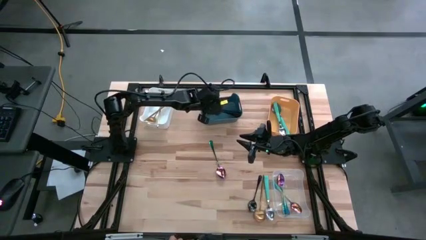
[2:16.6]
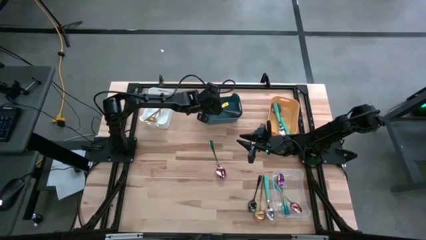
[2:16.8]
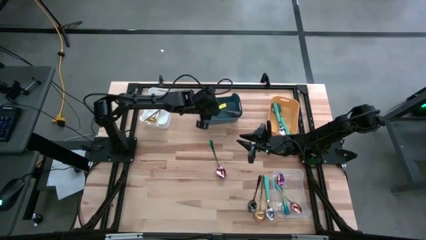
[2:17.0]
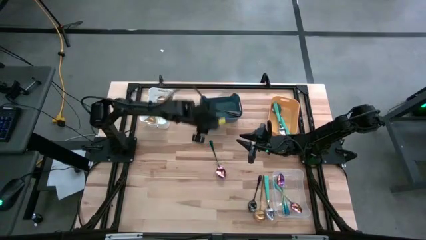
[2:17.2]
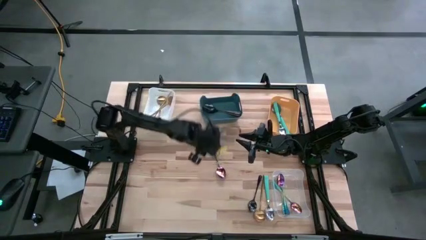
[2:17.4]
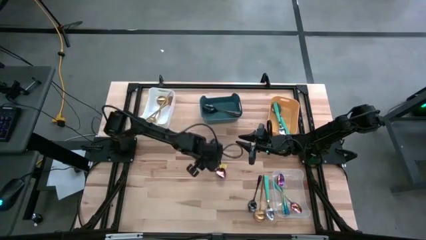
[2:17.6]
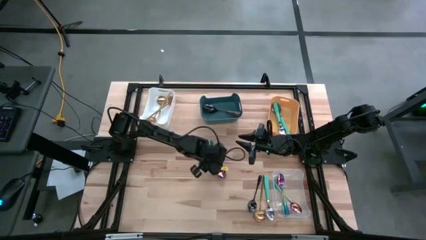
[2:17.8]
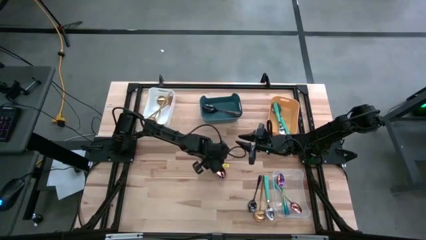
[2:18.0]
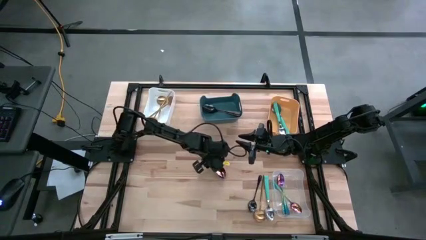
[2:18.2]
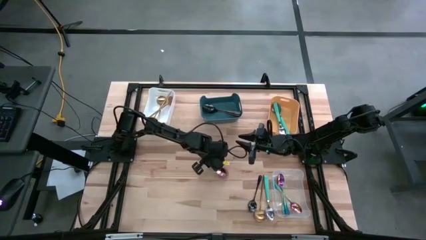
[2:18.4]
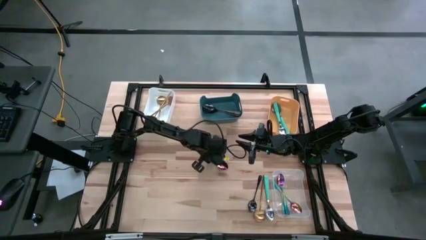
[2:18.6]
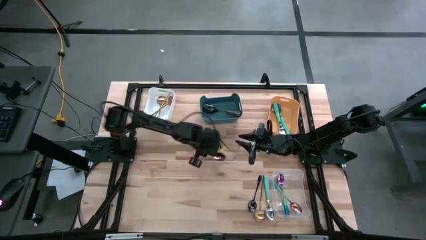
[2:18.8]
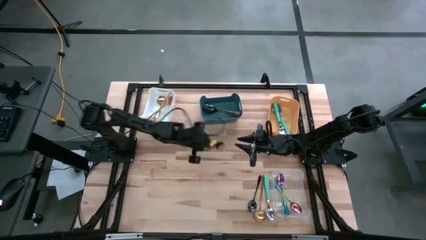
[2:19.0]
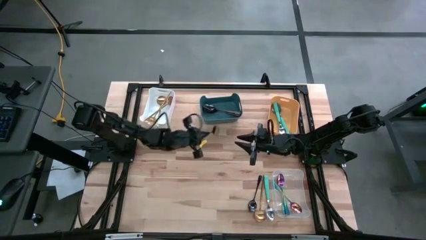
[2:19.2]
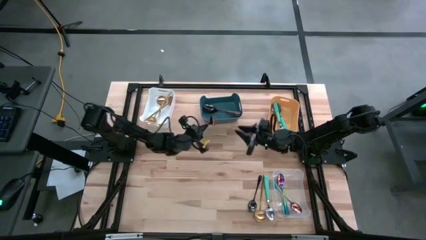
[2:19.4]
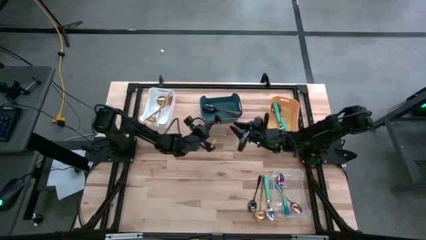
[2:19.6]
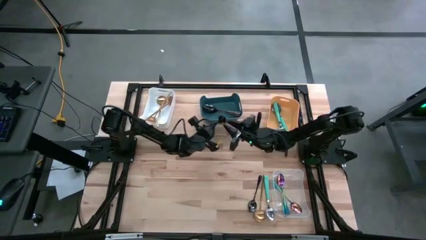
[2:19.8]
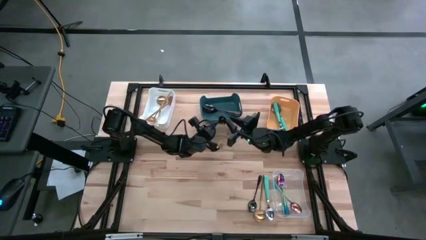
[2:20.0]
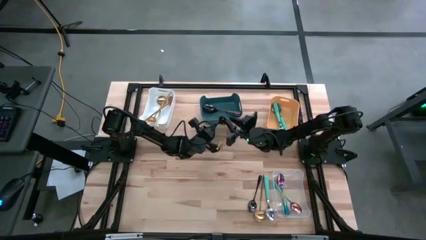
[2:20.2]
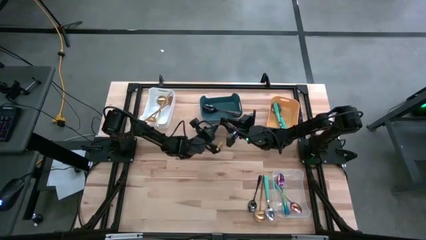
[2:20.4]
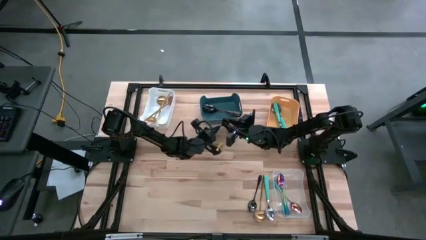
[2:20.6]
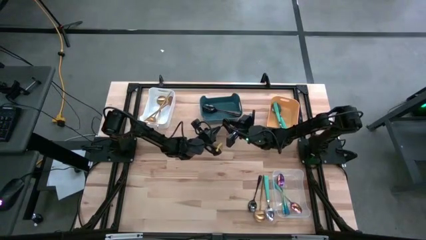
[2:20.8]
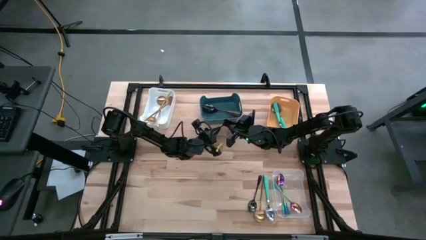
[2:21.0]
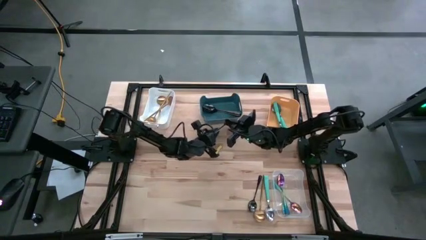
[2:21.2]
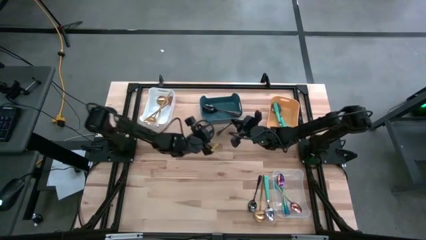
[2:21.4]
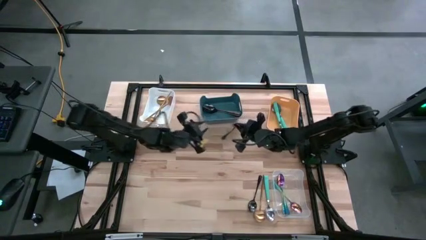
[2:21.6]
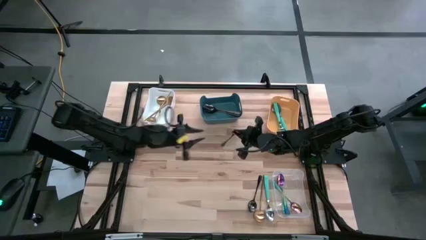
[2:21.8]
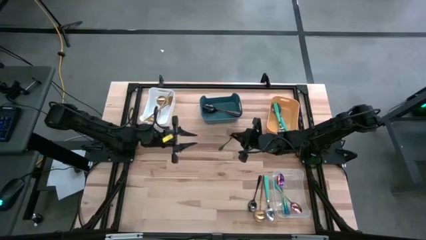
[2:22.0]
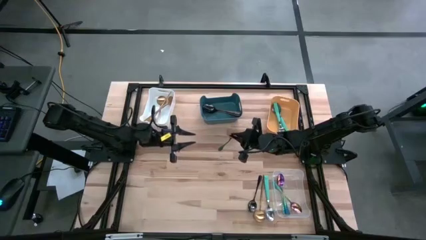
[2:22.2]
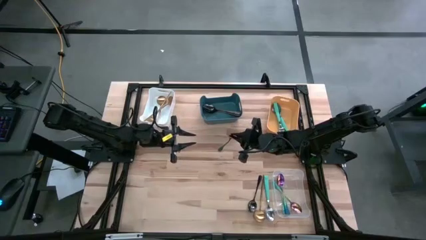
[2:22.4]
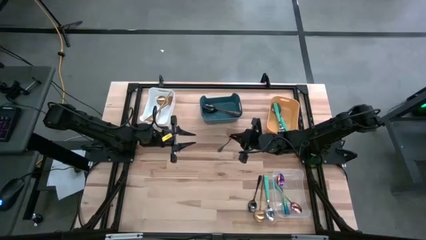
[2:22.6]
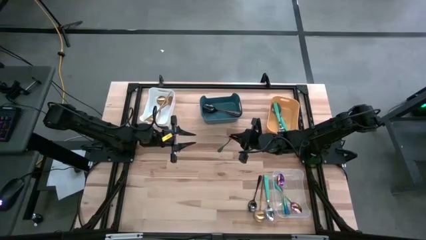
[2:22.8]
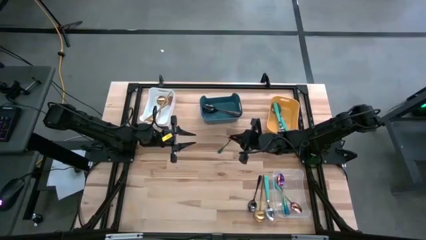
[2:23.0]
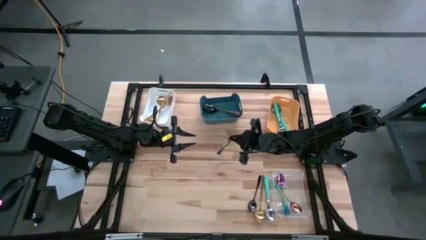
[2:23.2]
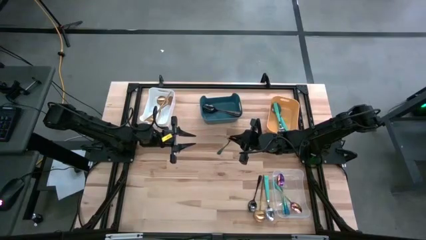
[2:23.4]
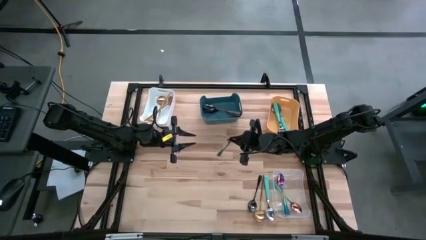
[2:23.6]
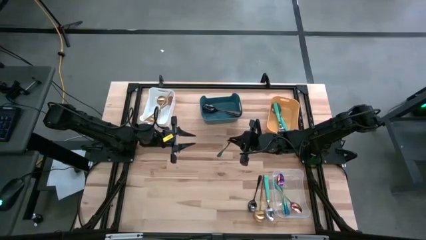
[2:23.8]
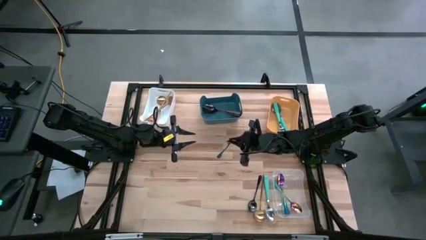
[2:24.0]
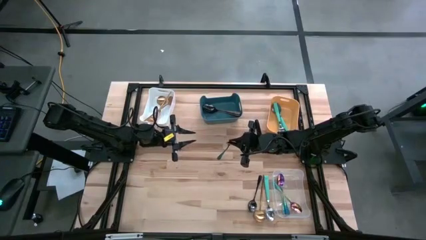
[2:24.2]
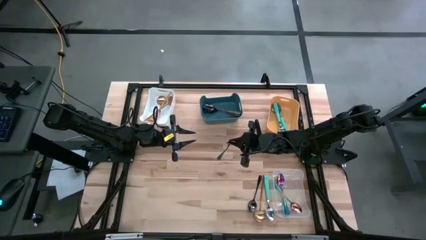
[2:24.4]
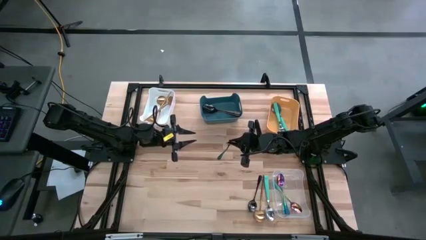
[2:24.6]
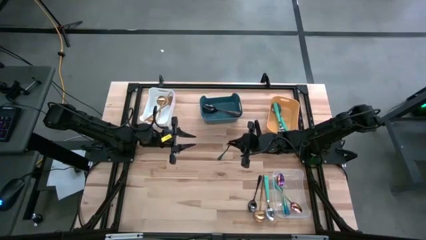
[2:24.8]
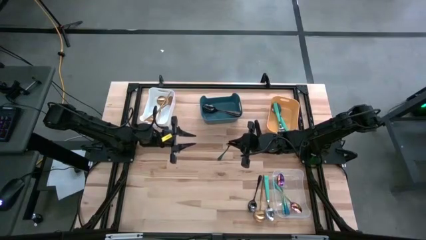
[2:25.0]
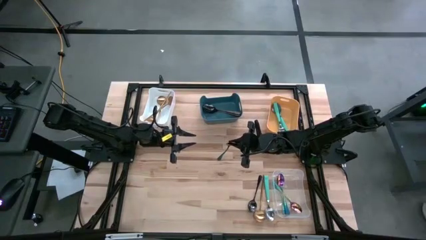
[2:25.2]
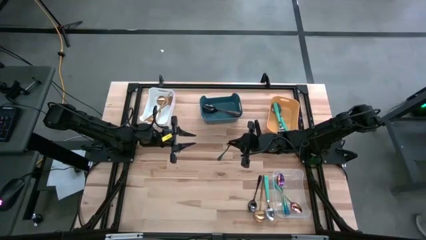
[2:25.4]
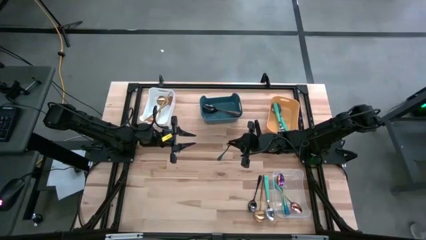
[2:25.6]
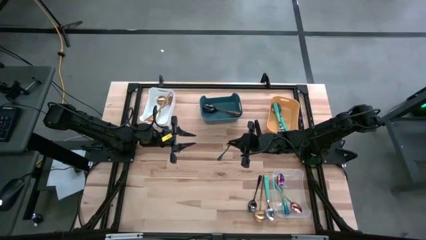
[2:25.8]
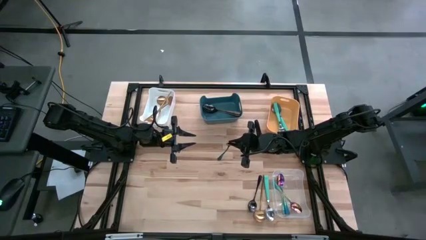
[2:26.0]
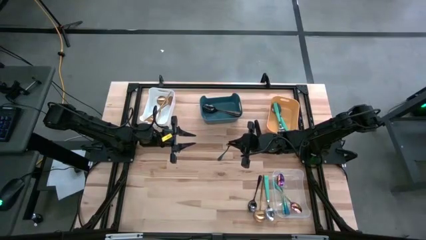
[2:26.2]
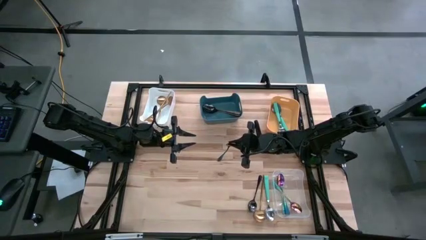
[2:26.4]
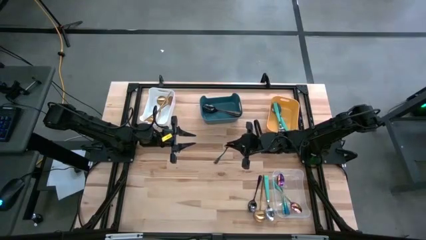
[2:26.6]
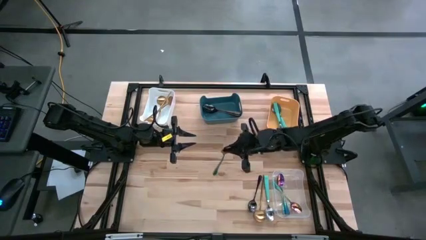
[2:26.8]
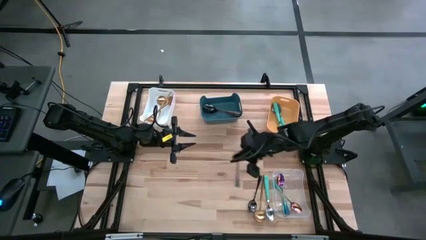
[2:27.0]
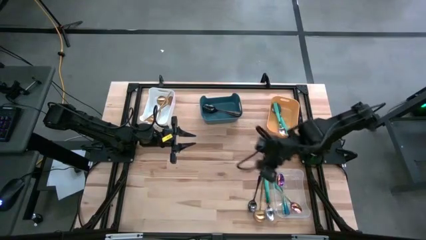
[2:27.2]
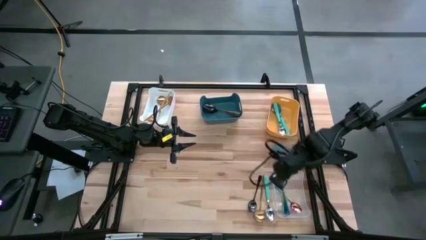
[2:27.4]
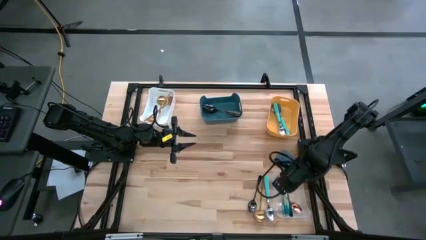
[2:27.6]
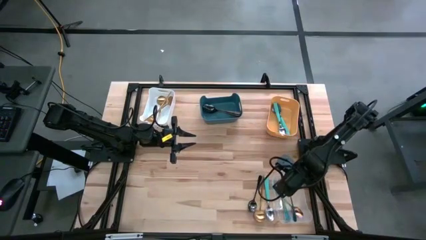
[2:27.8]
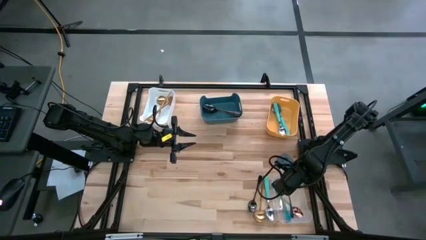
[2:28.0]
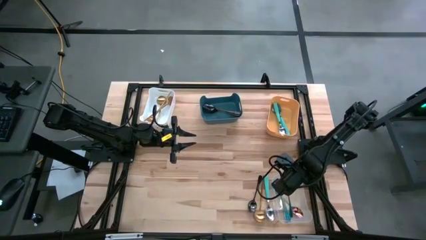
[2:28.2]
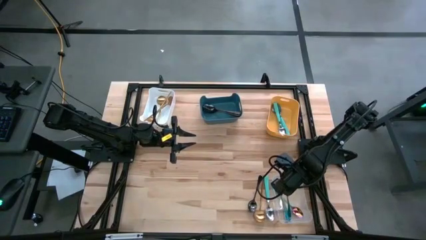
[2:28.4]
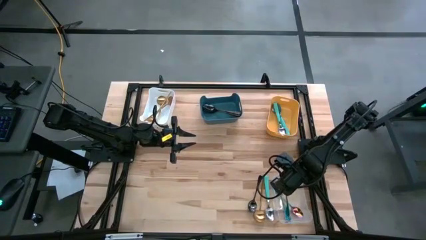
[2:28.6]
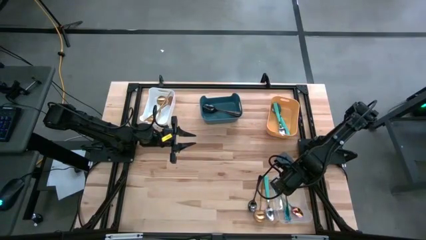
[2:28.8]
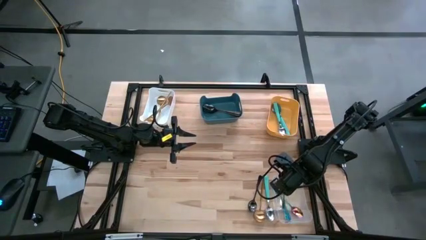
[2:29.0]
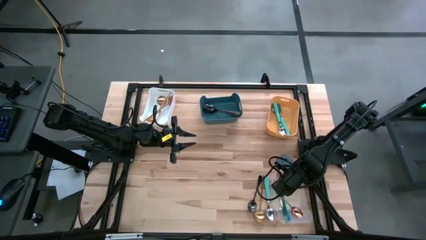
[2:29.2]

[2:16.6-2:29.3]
Task: Sort silverware by color (type)
Put the purple spoon into the transparent bin
